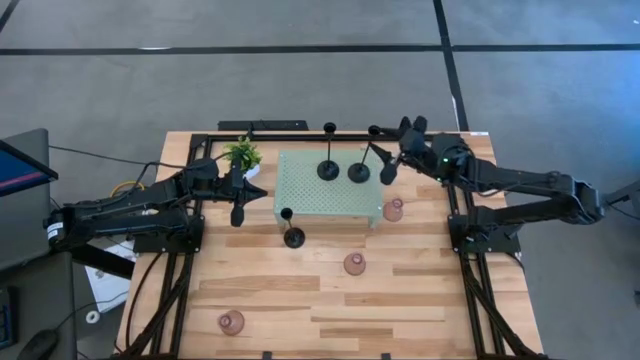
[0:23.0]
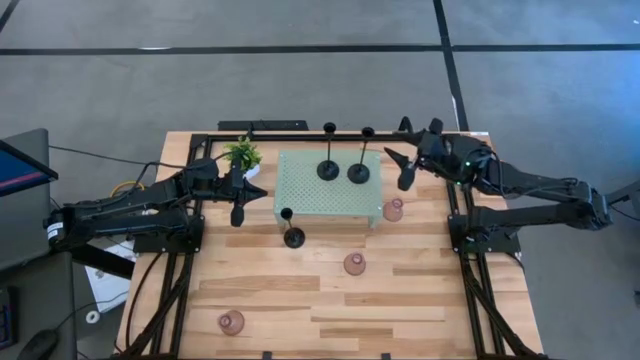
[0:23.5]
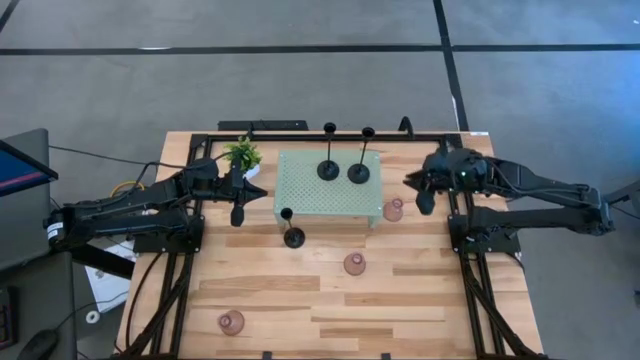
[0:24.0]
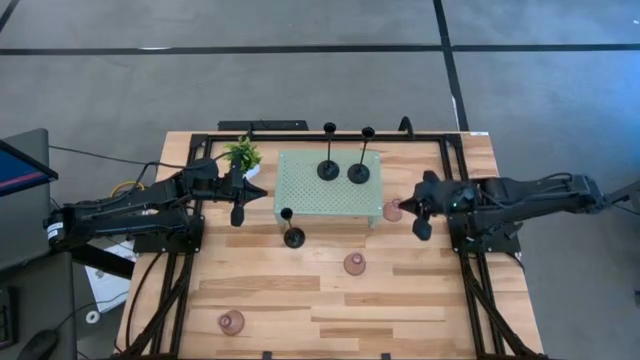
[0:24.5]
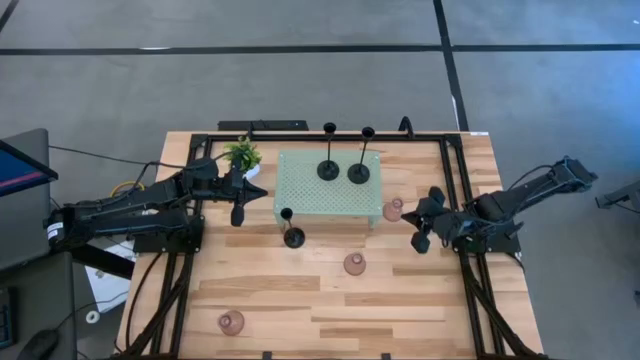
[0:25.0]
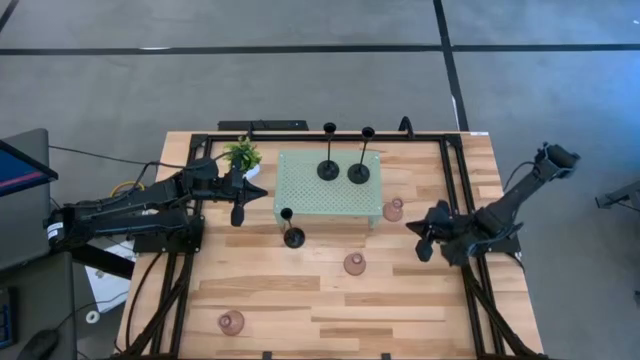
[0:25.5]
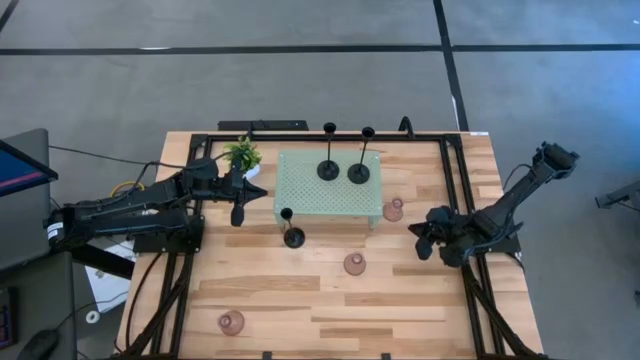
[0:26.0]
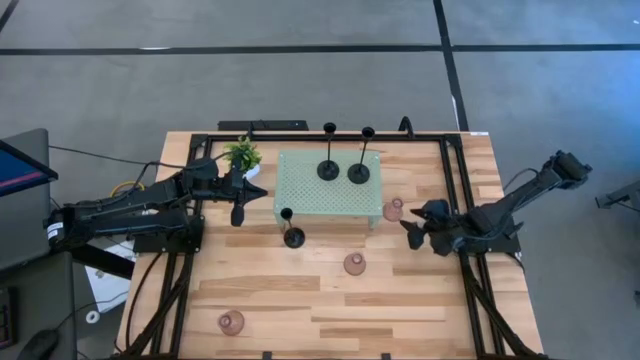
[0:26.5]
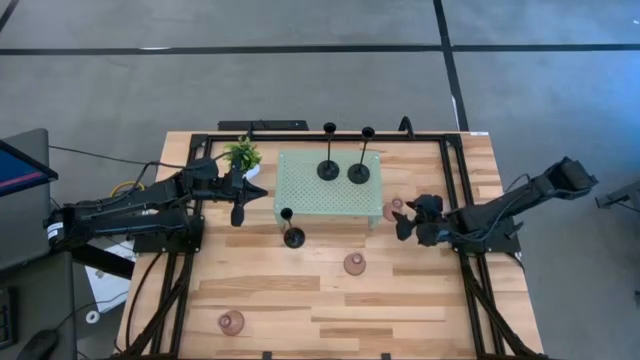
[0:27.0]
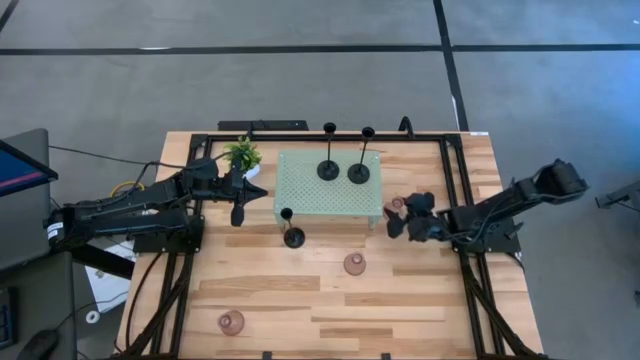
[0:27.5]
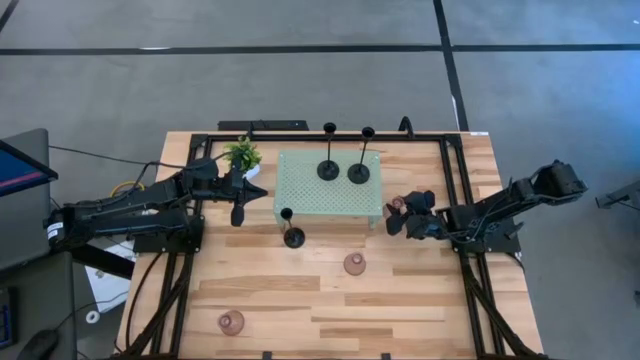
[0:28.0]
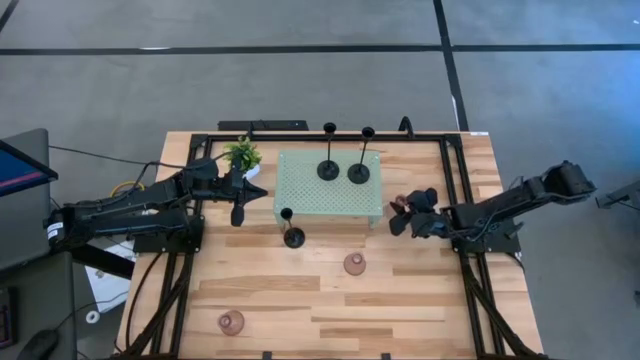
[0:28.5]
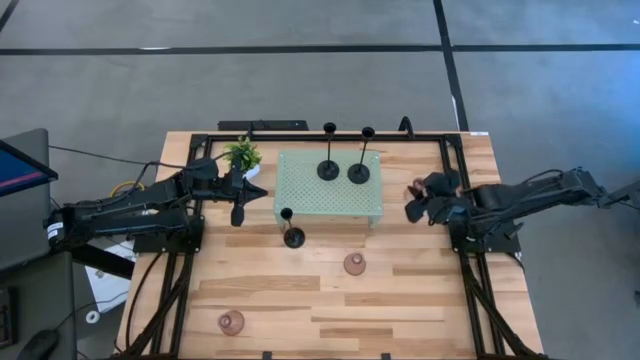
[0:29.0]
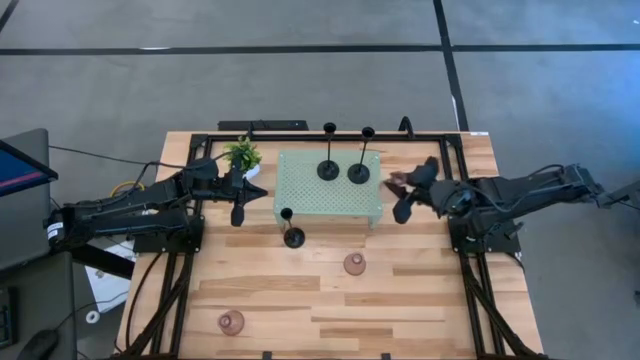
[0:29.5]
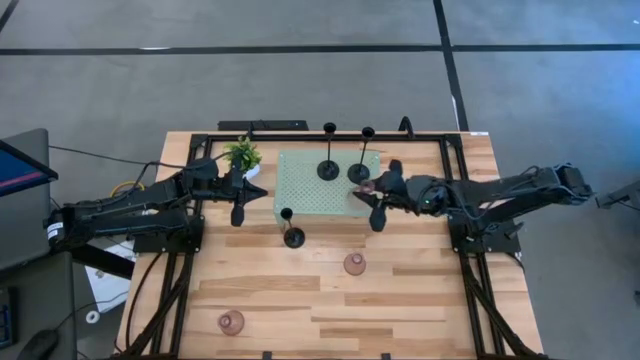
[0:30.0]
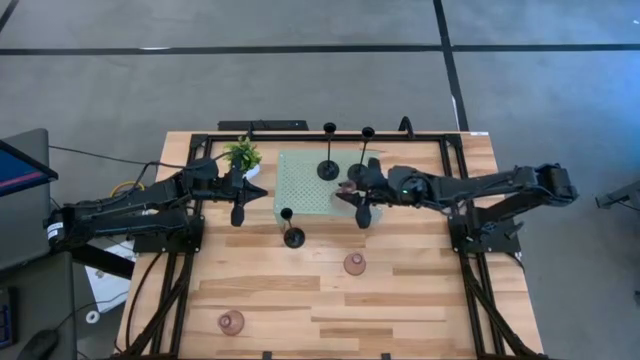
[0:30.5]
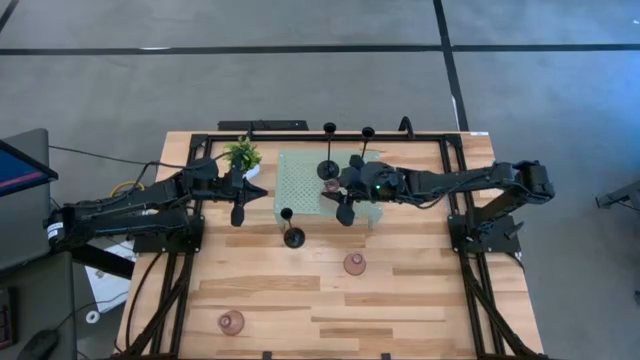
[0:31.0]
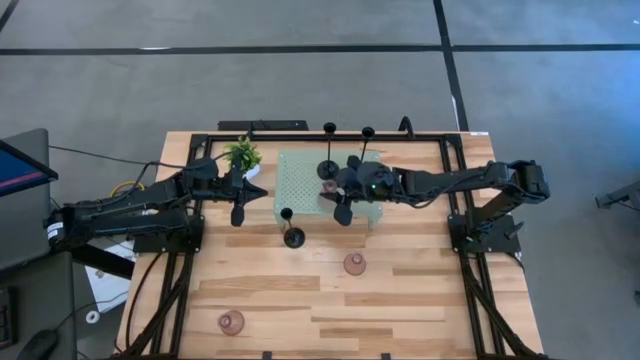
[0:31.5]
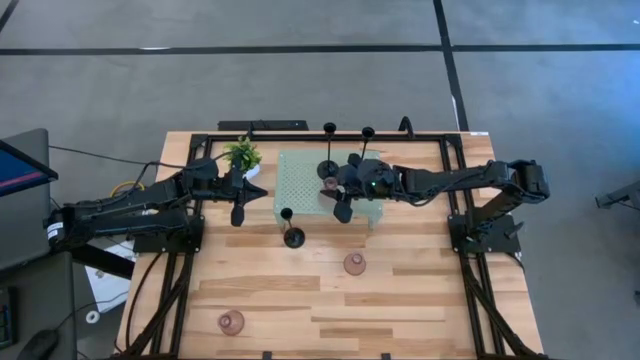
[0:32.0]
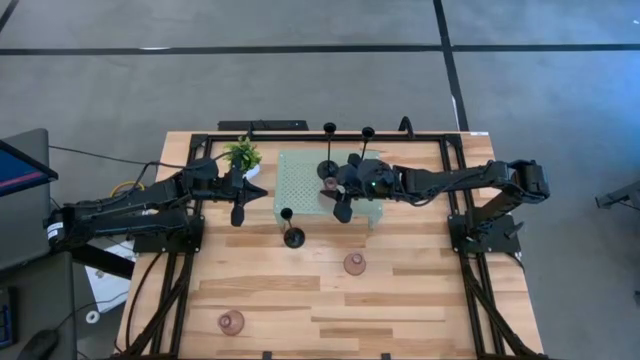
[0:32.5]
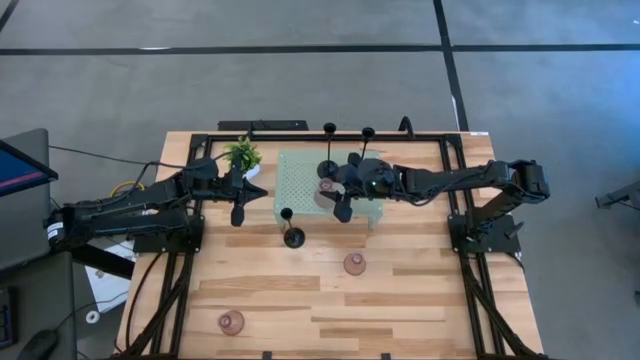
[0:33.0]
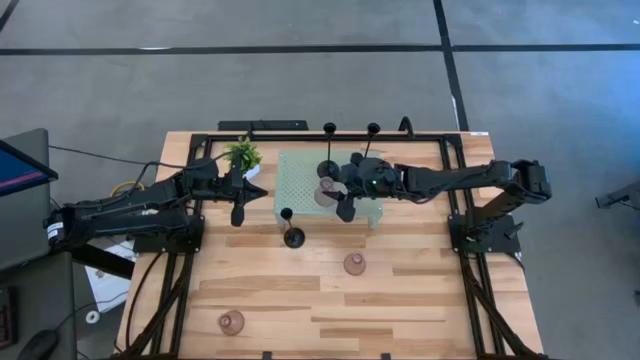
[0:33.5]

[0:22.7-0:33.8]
Task: Pick & Place candle stick holders
Put the top right pink glass candle holder on the shelf aligned with the left black candle holder

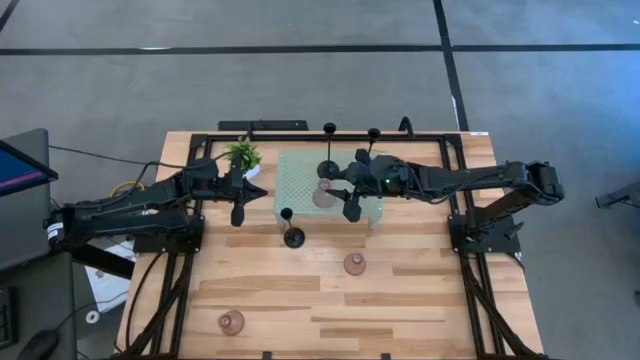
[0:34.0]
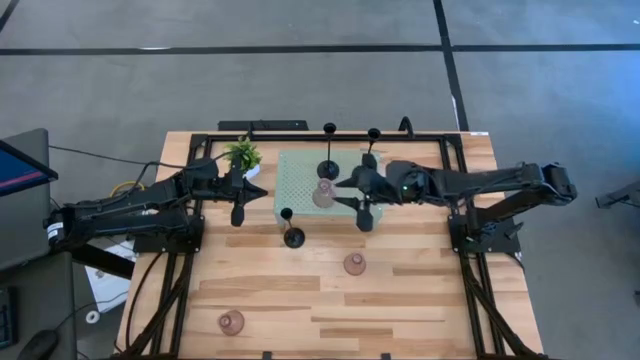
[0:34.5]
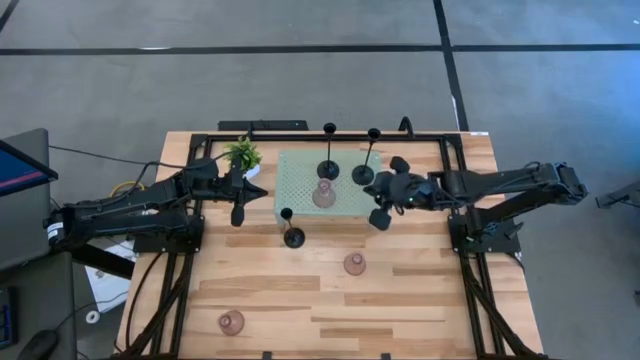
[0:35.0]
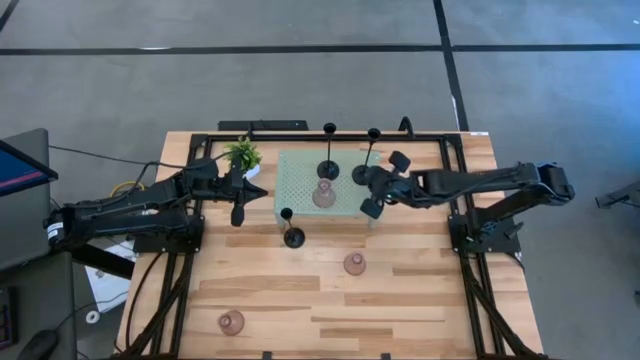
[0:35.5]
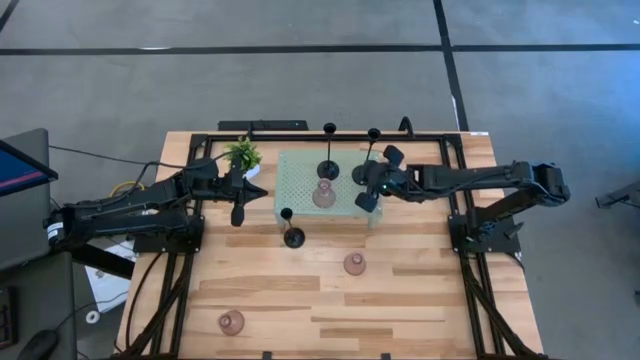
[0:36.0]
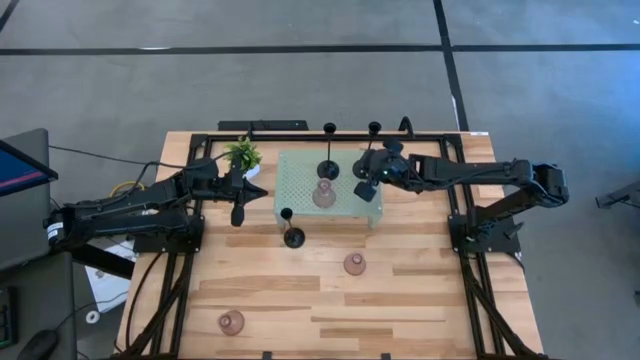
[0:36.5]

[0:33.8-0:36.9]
Adjust the right black candle holder on the shelf

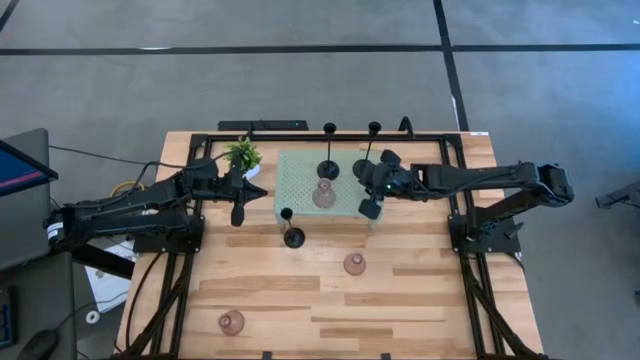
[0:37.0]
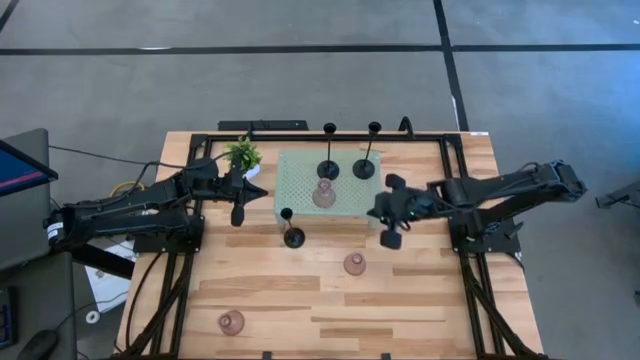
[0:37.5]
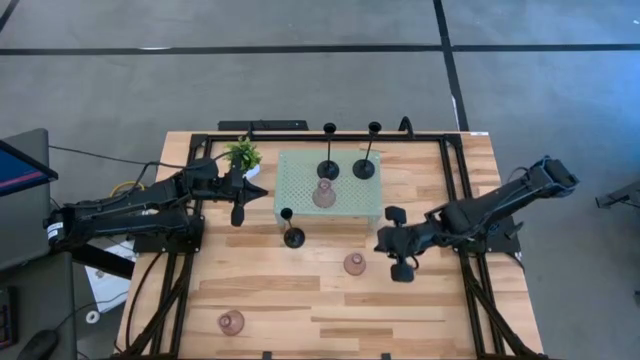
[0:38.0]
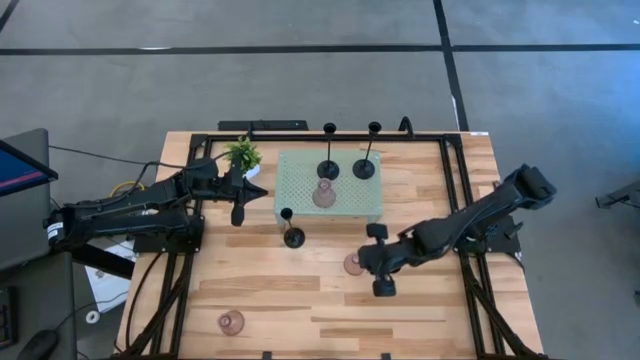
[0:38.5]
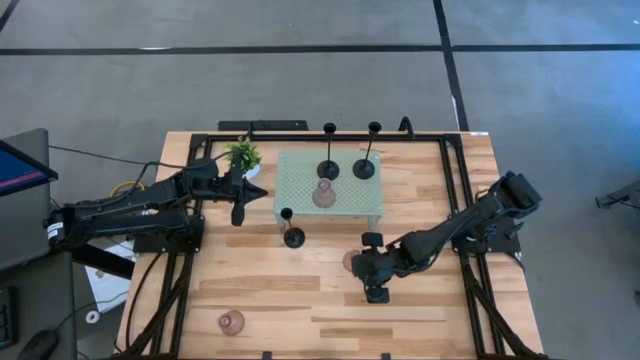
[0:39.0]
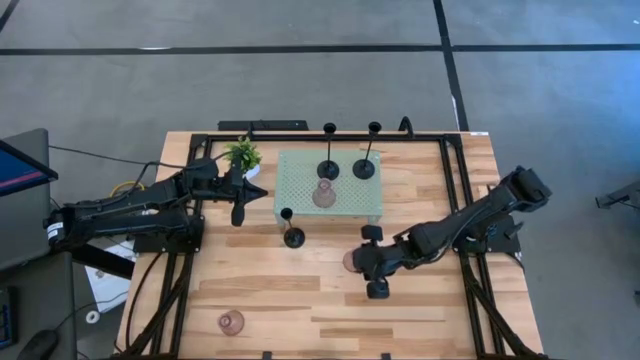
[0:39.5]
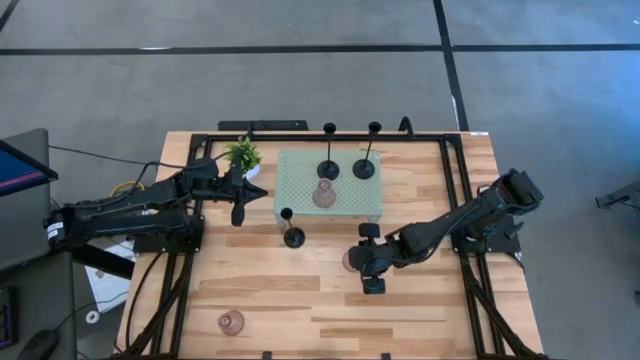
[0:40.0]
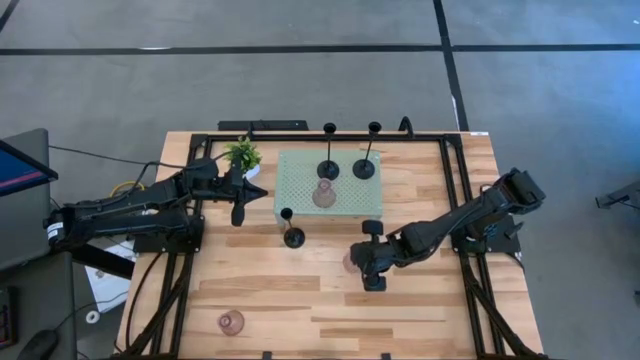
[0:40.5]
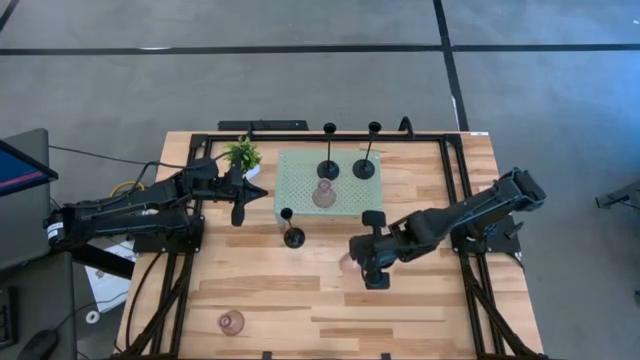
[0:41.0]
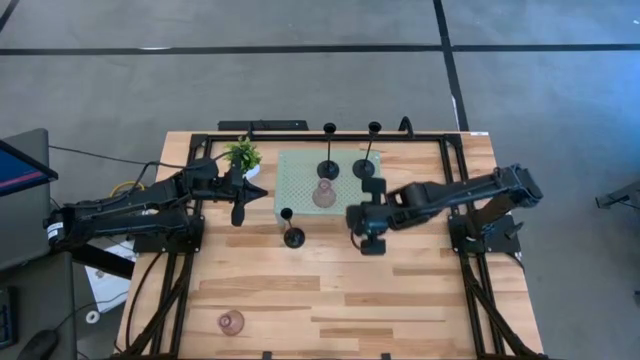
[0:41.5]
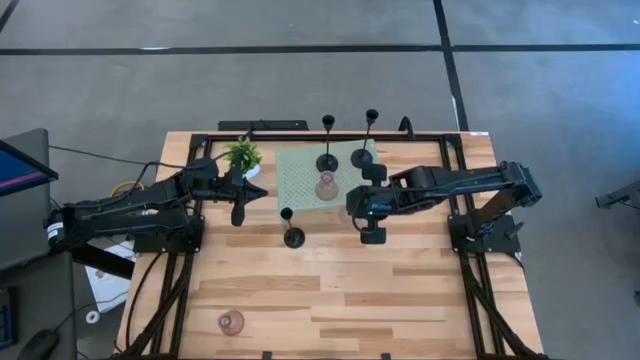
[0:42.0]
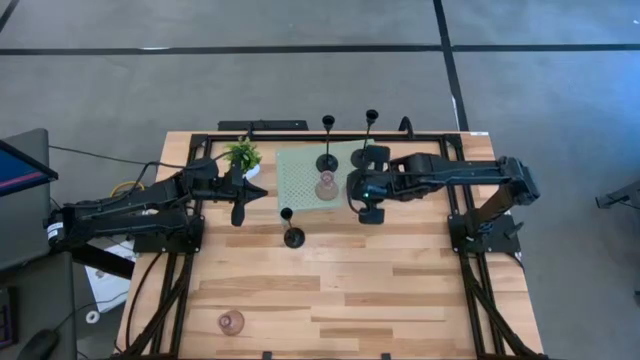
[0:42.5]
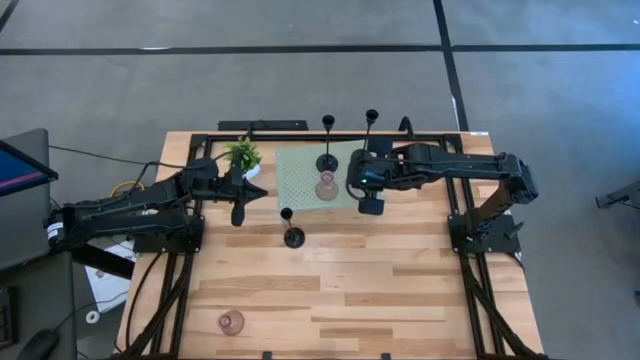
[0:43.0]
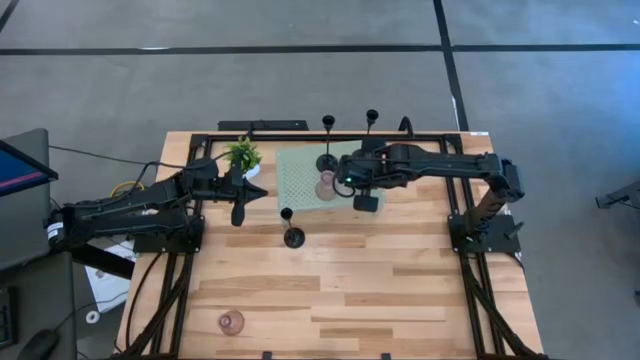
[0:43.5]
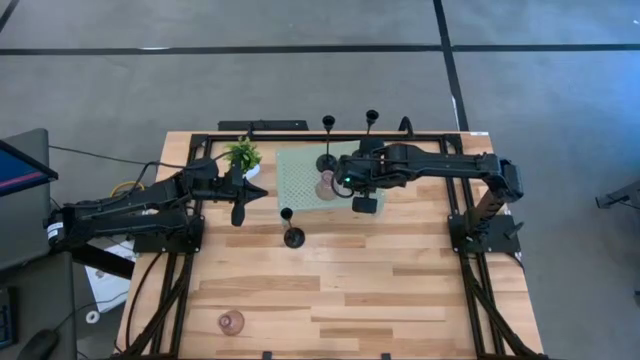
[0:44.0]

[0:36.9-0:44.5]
Put the top pink glass candle holder on the shelf aligned with the right black candle holder
